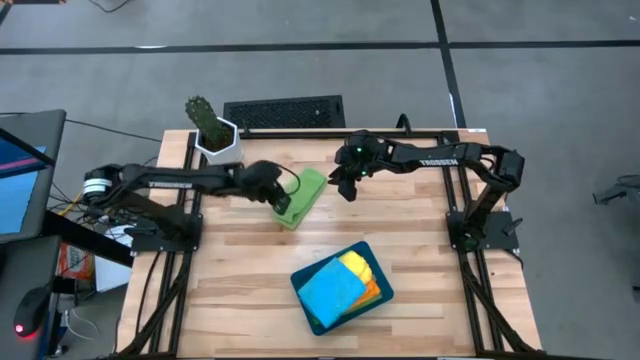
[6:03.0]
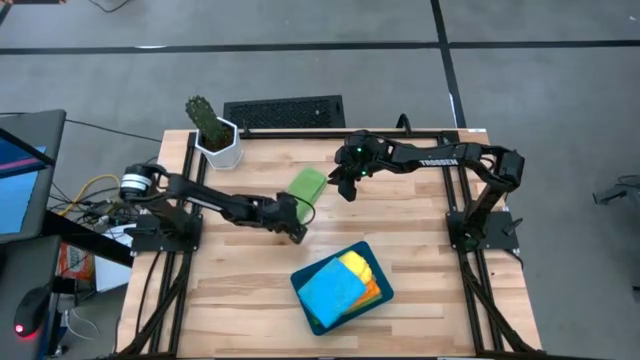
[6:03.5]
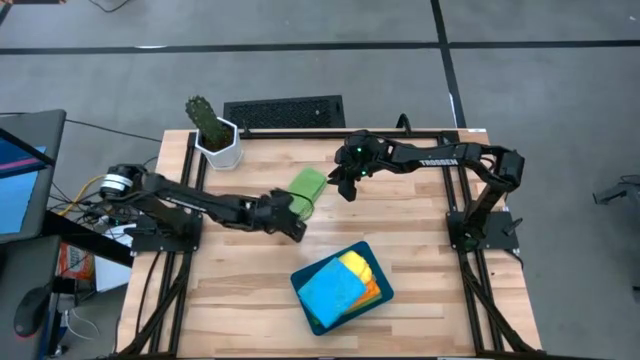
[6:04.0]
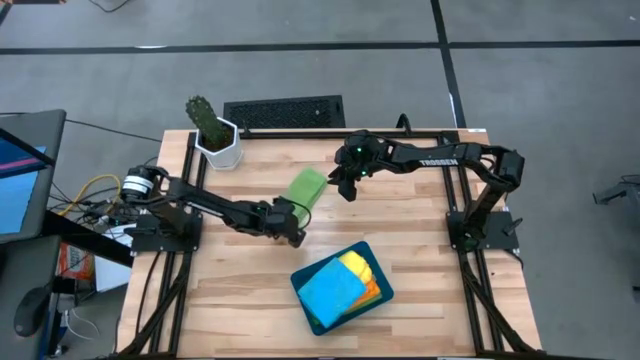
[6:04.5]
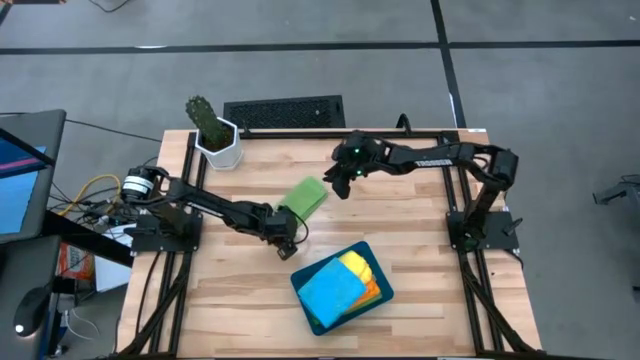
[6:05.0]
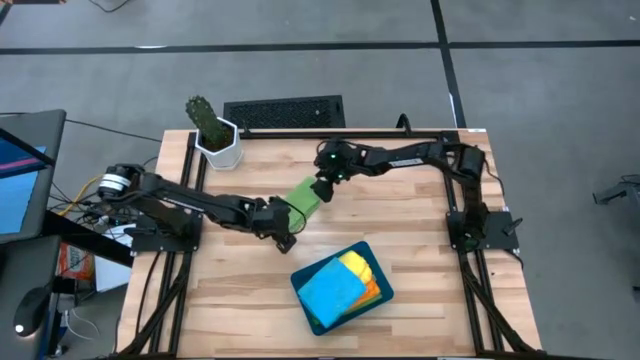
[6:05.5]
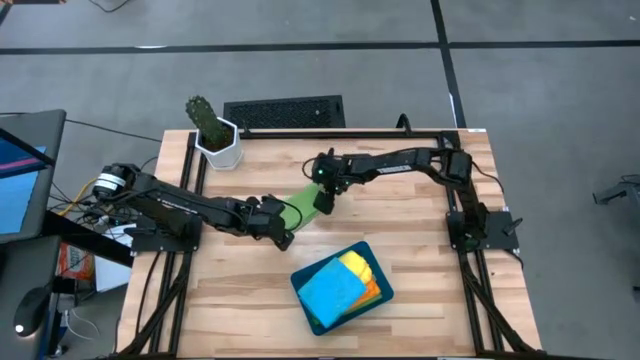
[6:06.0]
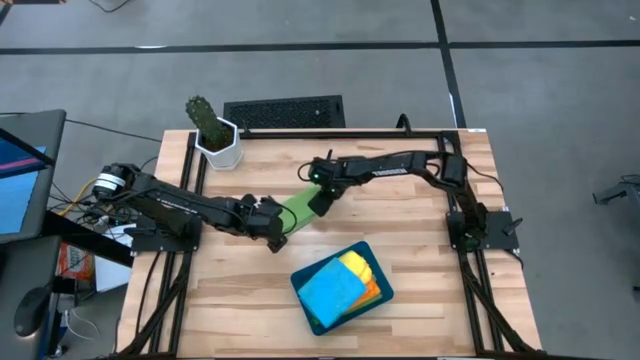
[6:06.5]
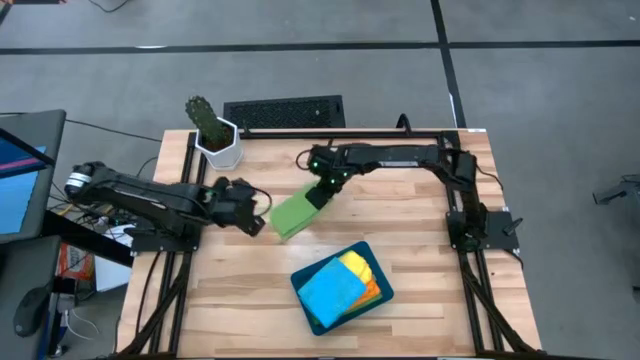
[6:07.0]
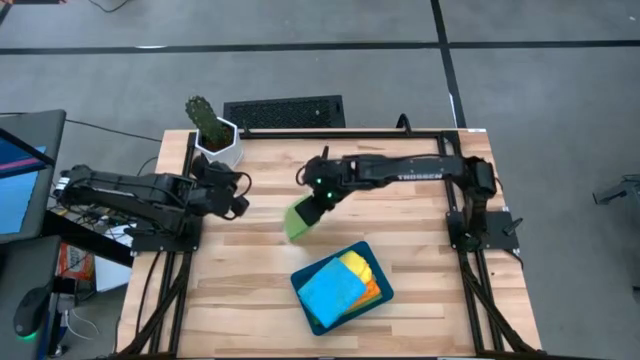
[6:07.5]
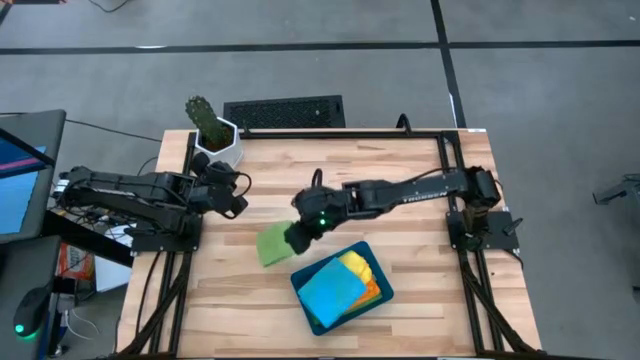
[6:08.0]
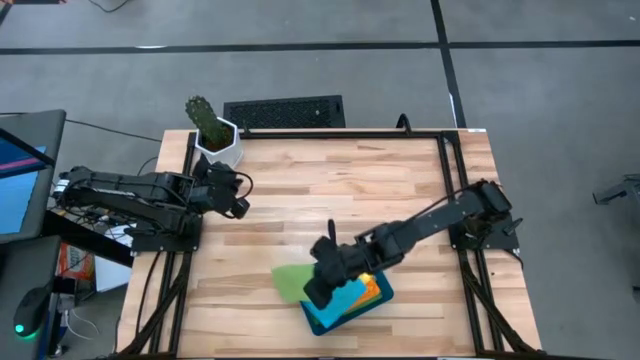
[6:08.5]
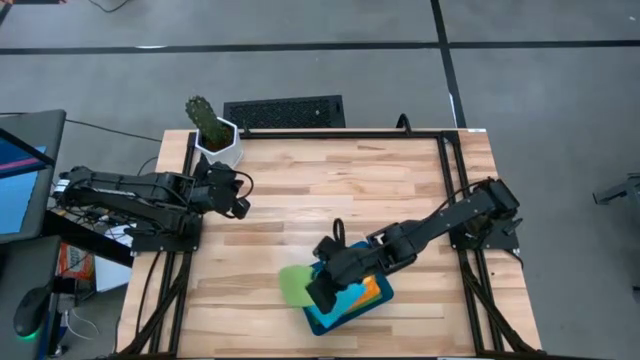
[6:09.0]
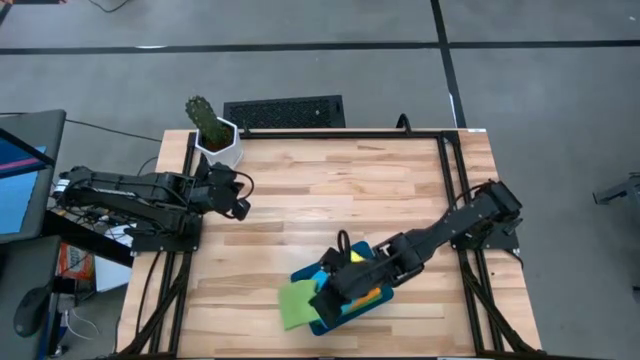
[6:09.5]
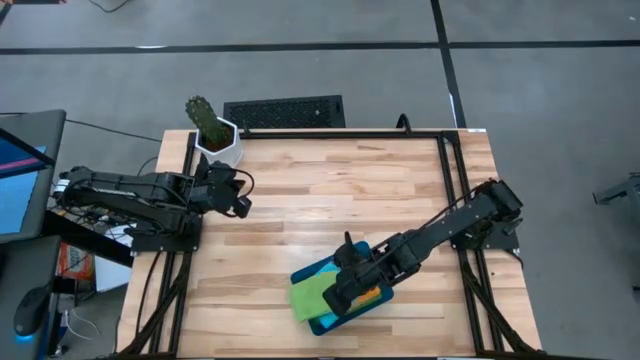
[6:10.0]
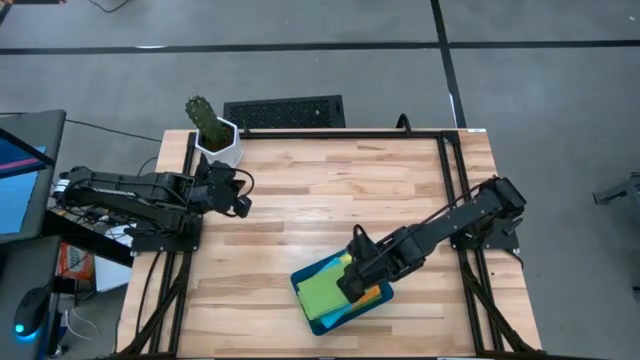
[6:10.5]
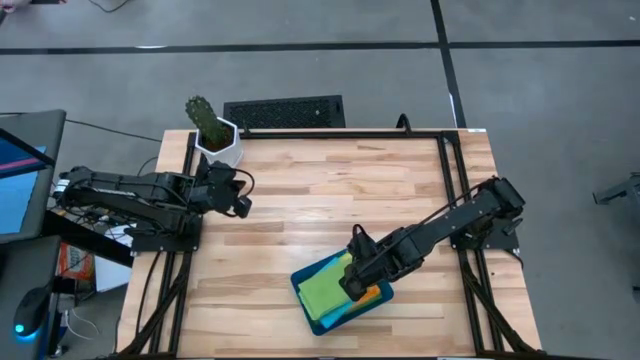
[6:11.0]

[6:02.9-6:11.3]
Task: Fold microfiber towels
Put the folded green microfiber towel into the blue bin

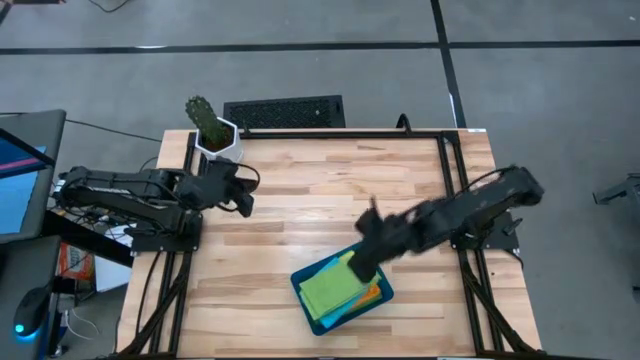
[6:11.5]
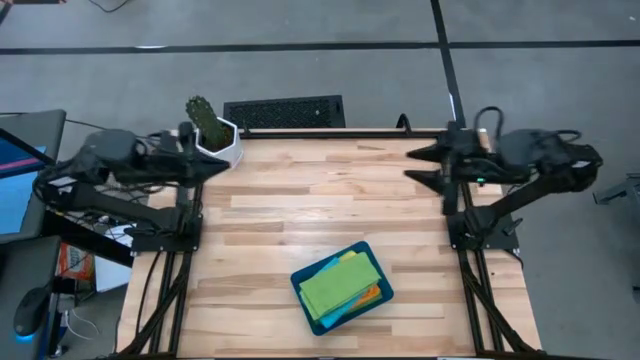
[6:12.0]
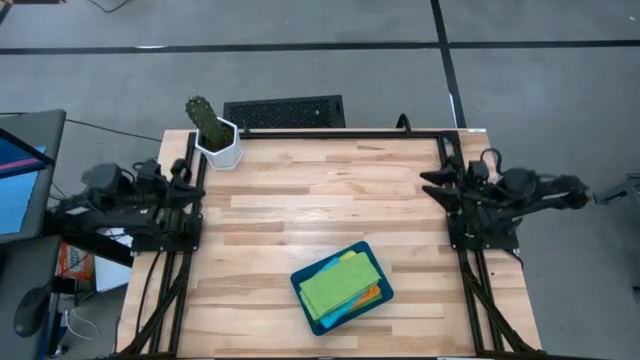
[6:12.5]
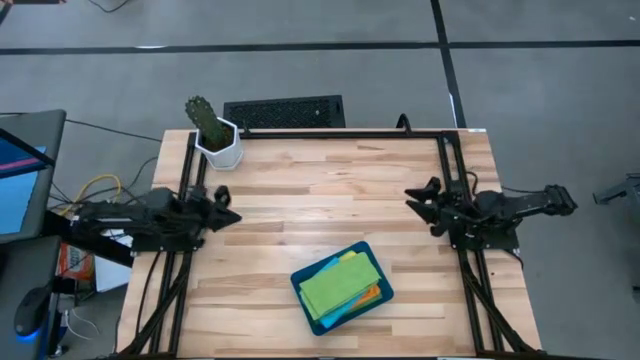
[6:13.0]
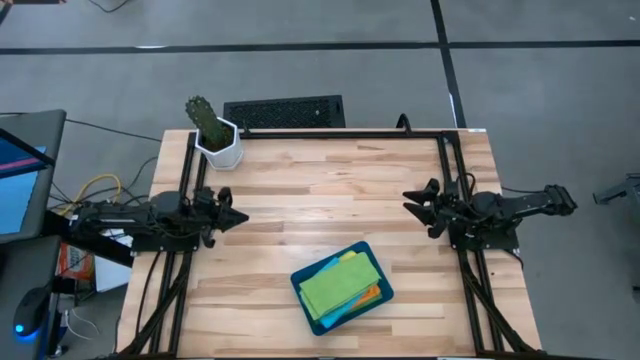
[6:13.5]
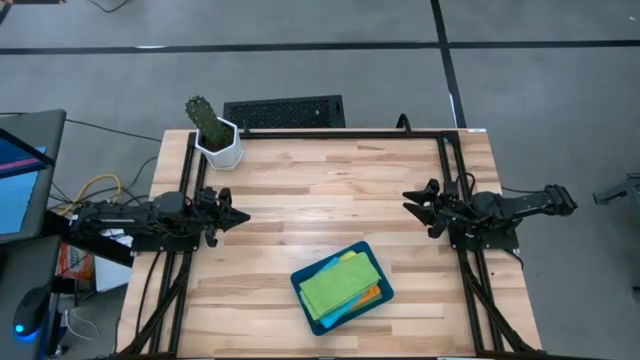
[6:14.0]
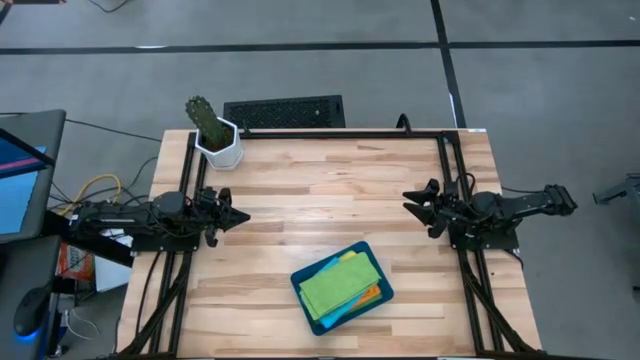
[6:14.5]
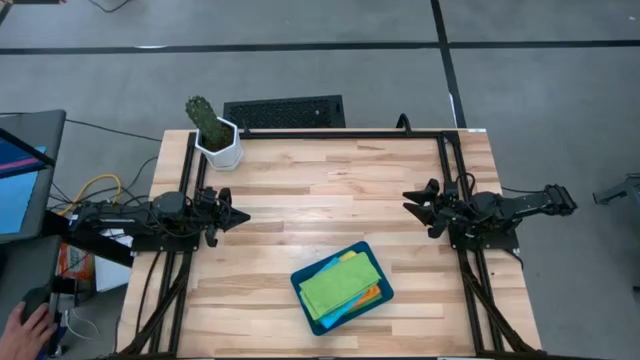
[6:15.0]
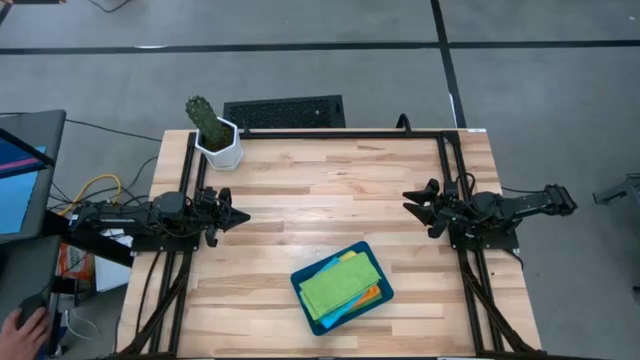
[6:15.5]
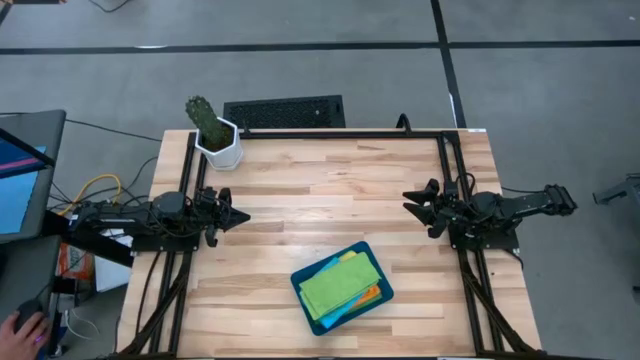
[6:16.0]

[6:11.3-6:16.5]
Return to Home Position

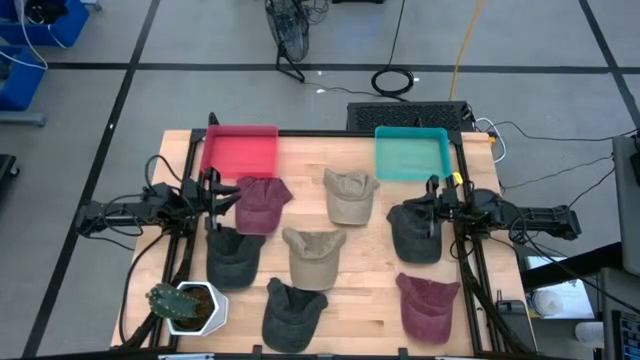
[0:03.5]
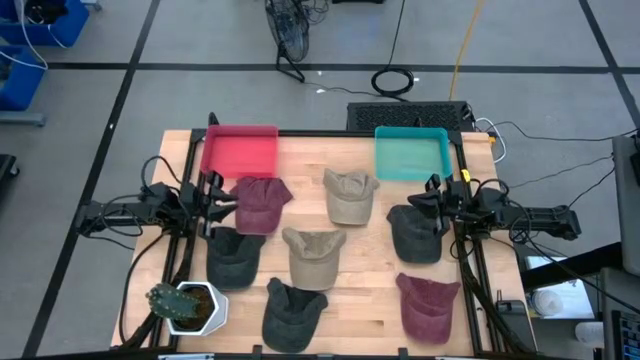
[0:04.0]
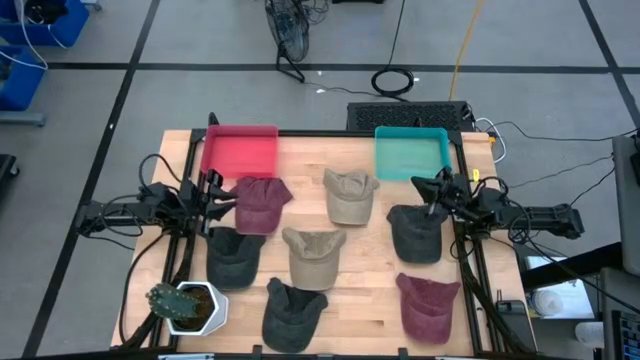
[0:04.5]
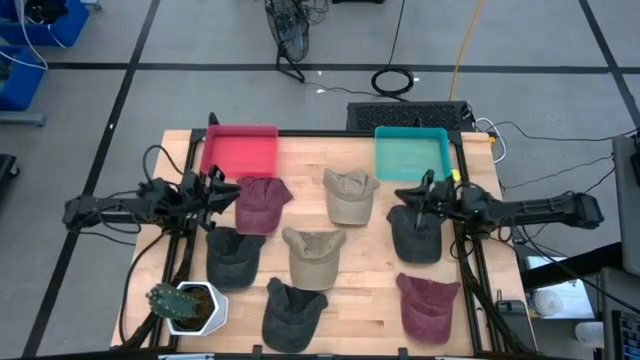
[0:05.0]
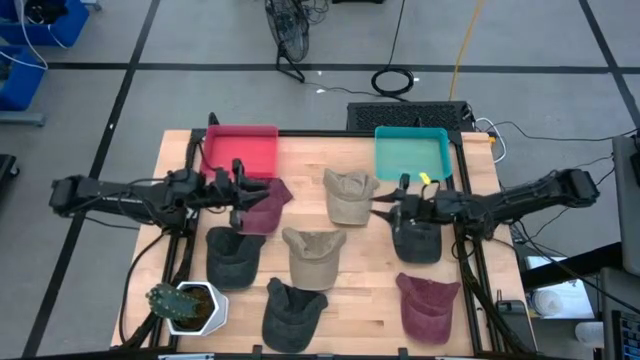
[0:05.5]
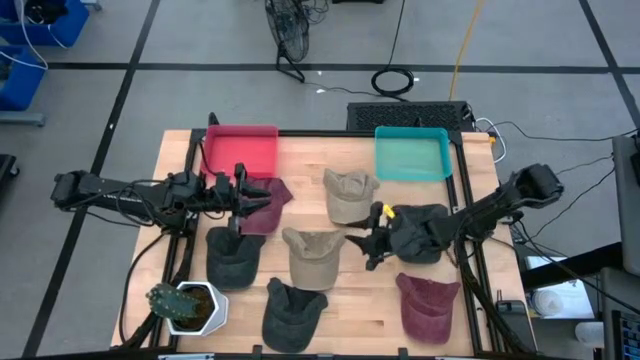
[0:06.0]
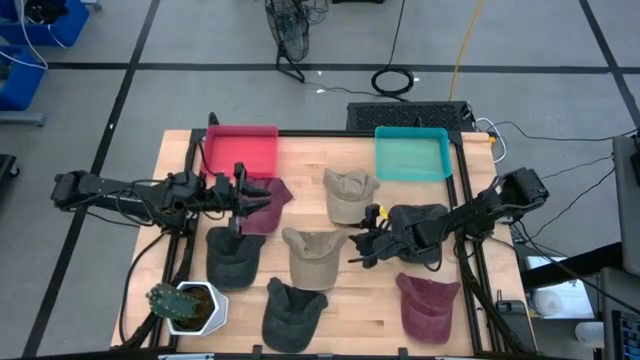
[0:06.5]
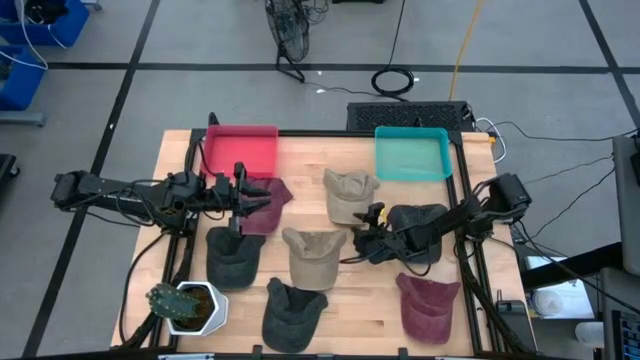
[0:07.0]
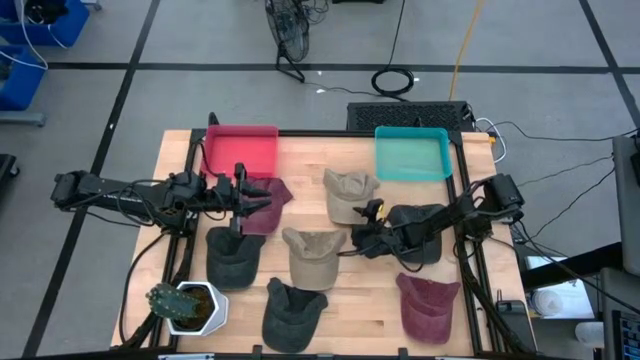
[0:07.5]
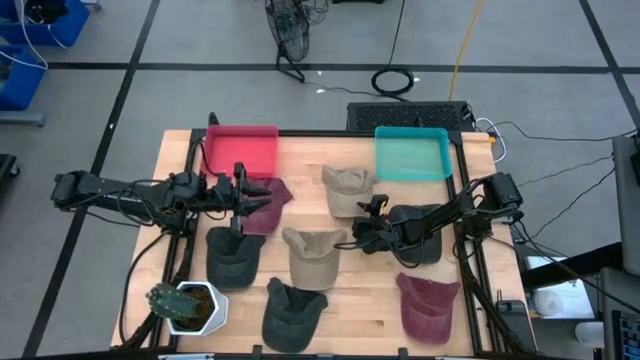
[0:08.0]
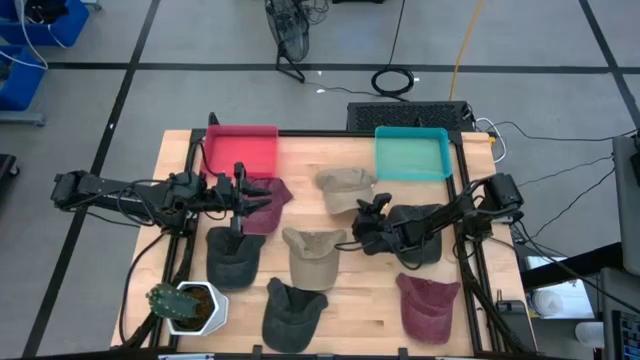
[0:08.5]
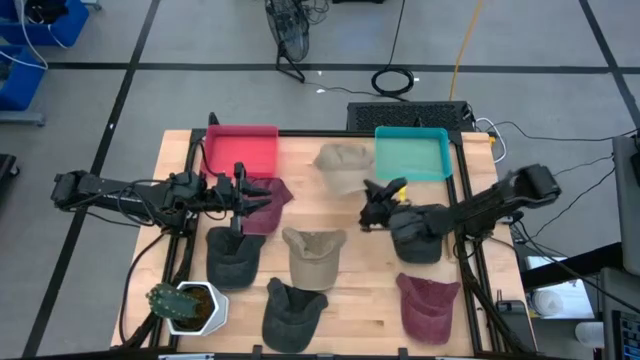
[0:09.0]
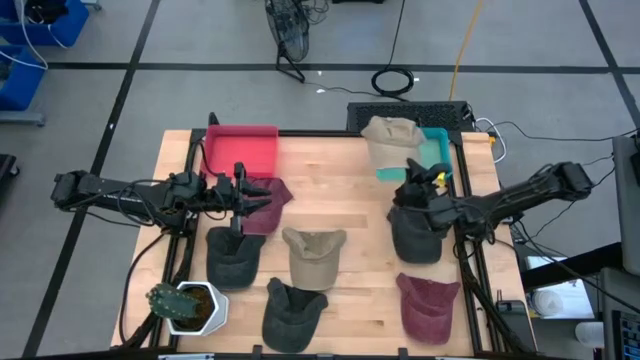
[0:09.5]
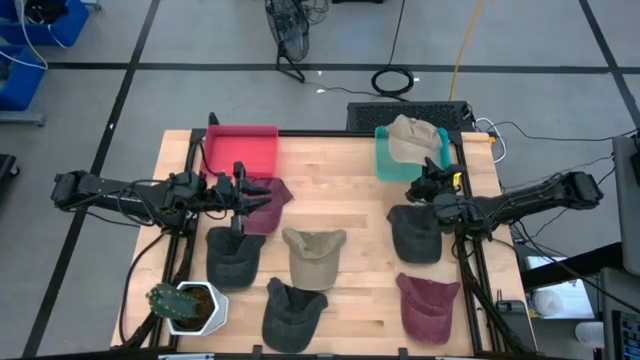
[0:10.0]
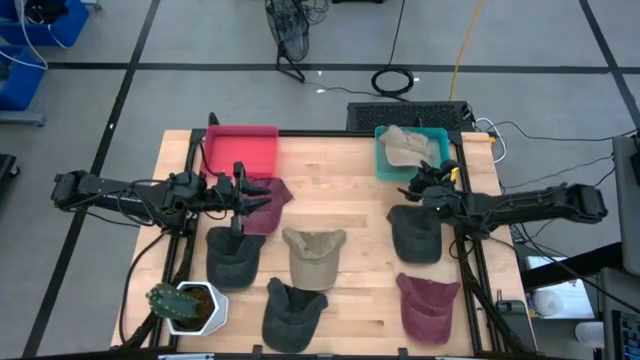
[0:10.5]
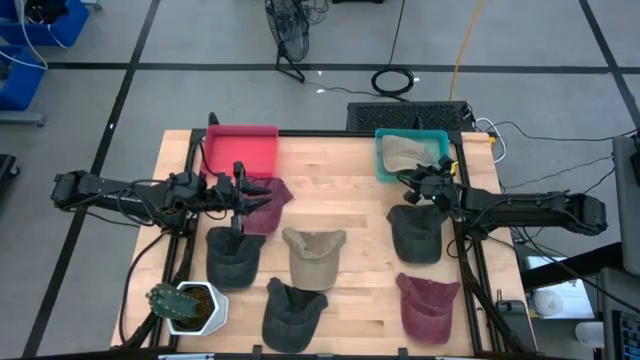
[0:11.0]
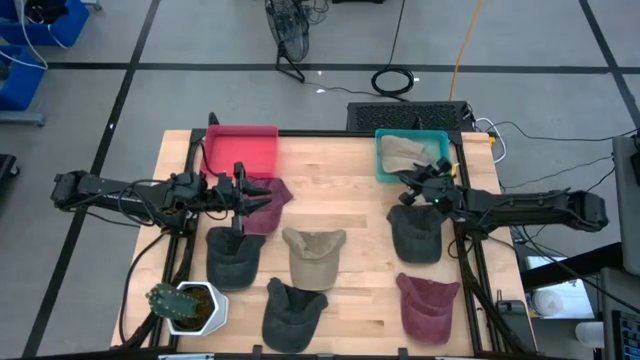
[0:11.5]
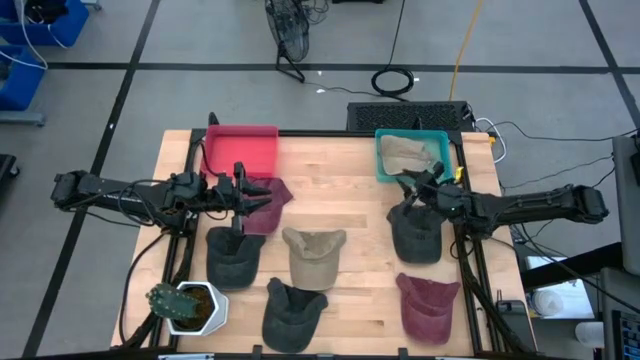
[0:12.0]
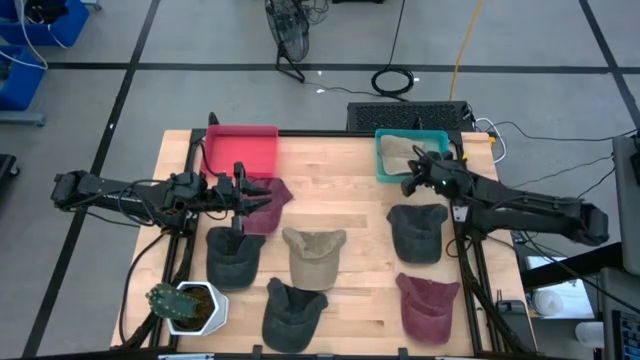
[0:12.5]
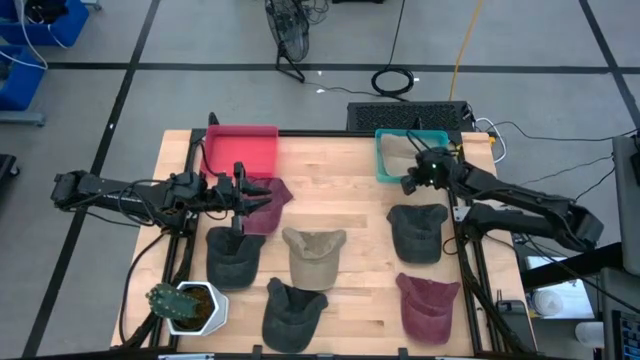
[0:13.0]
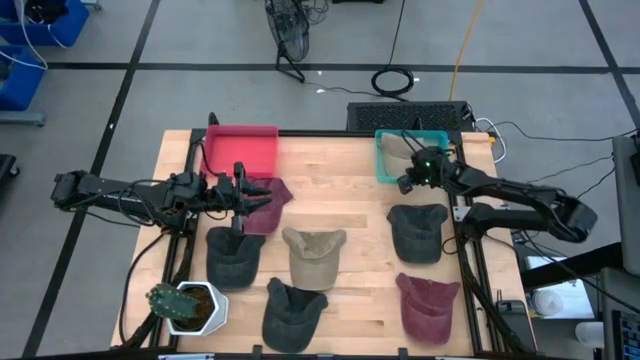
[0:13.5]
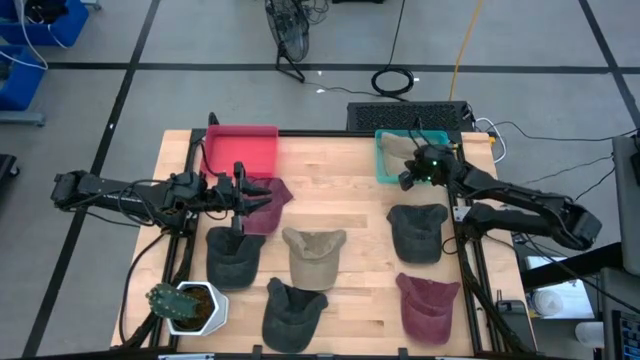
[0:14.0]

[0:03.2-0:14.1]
Task: Pick & Place hat
Put the top brown cap into the green bin
